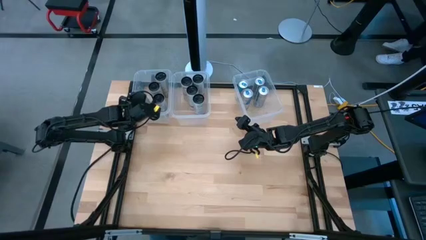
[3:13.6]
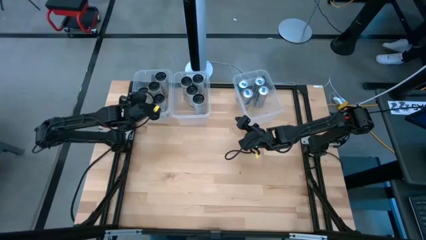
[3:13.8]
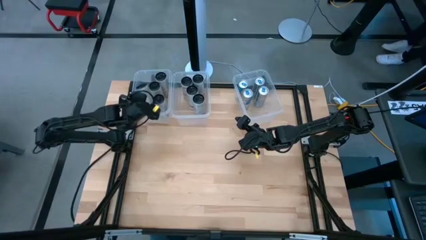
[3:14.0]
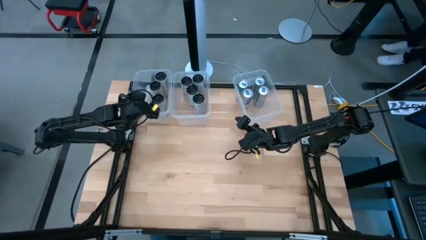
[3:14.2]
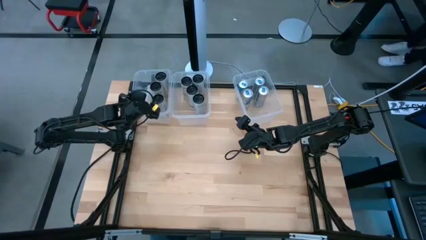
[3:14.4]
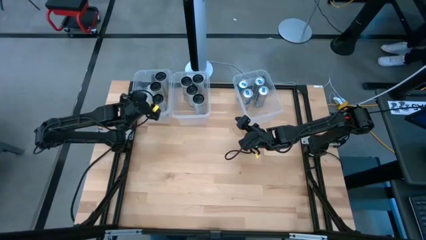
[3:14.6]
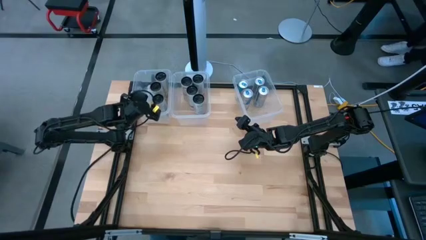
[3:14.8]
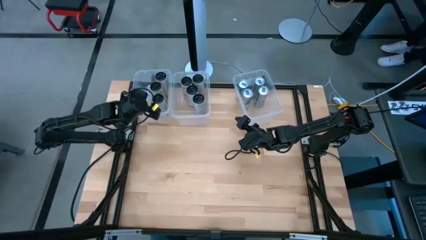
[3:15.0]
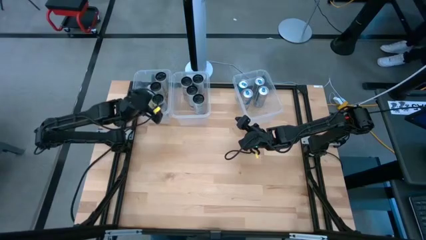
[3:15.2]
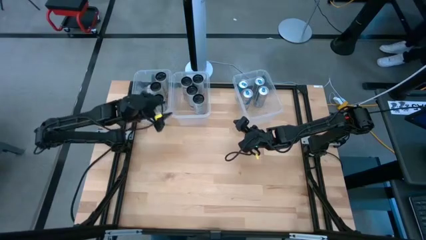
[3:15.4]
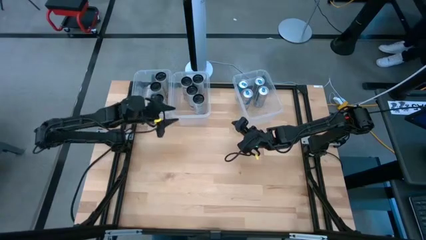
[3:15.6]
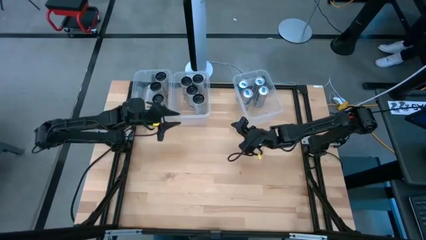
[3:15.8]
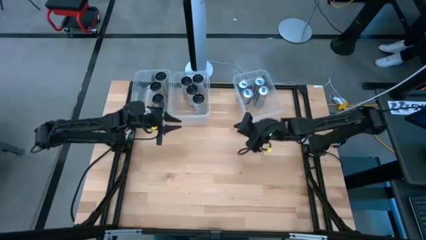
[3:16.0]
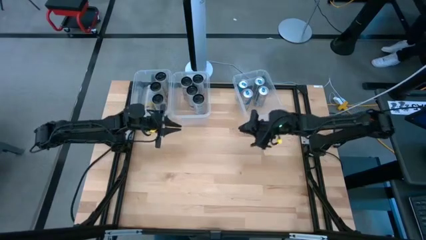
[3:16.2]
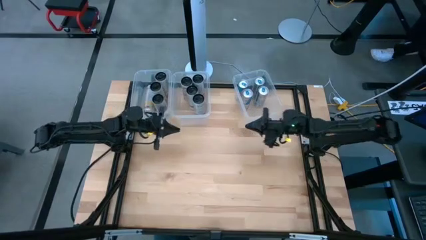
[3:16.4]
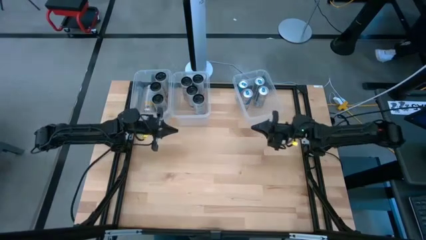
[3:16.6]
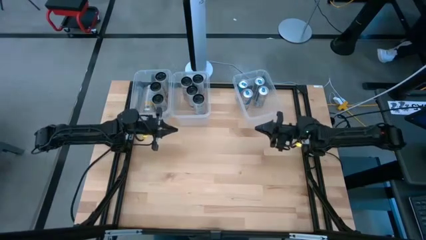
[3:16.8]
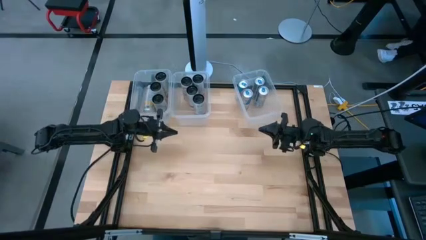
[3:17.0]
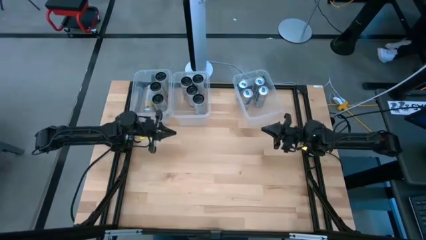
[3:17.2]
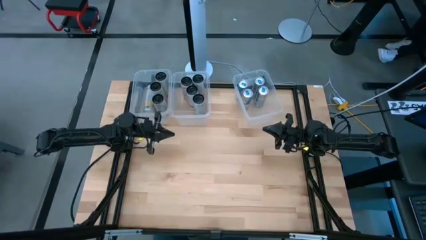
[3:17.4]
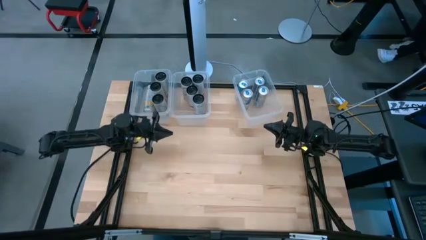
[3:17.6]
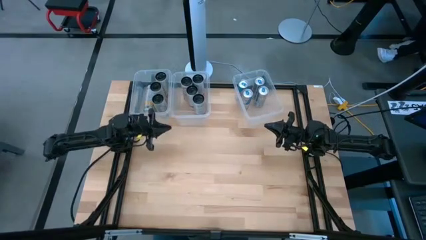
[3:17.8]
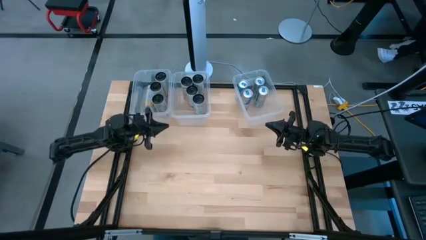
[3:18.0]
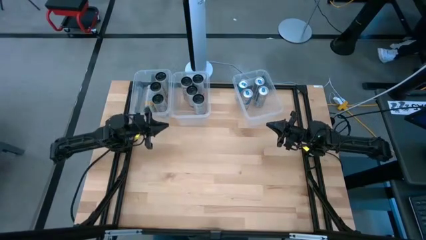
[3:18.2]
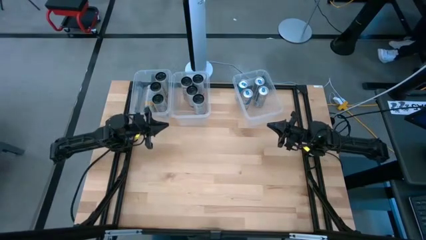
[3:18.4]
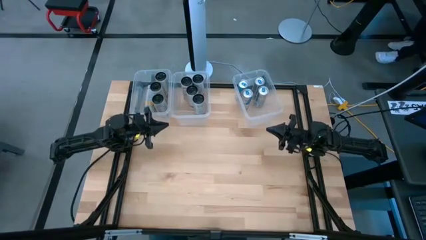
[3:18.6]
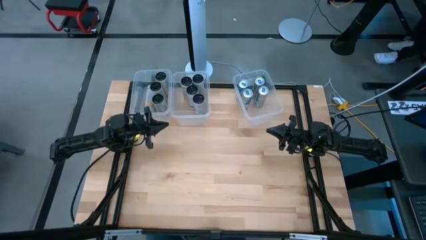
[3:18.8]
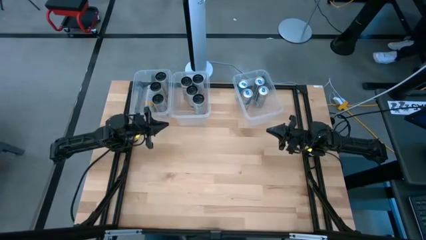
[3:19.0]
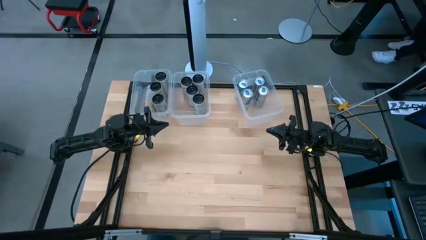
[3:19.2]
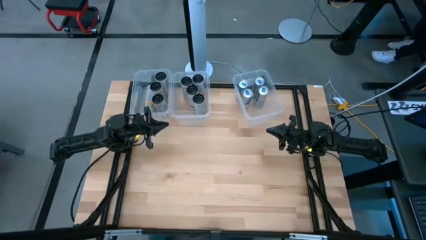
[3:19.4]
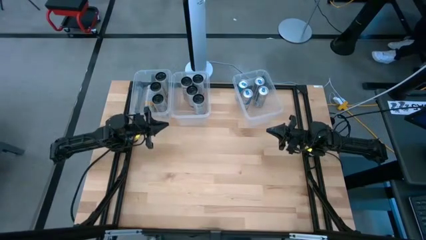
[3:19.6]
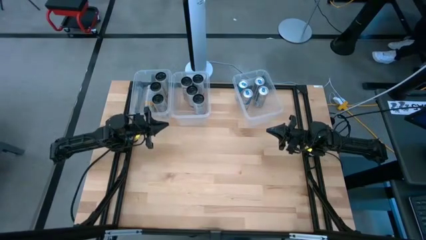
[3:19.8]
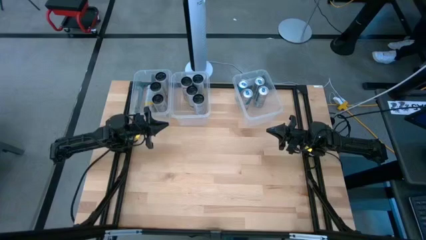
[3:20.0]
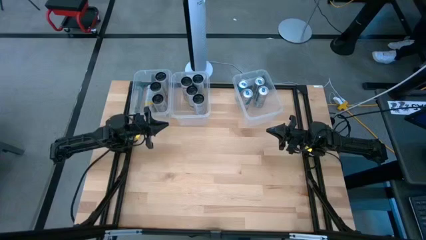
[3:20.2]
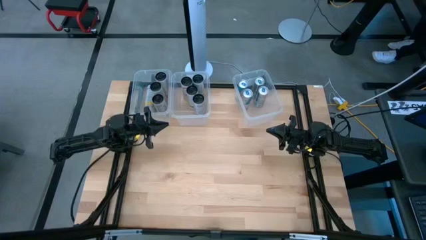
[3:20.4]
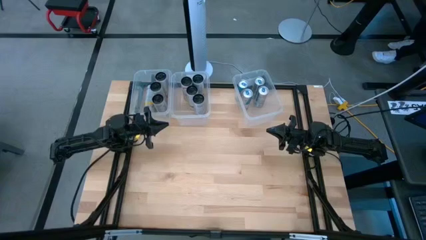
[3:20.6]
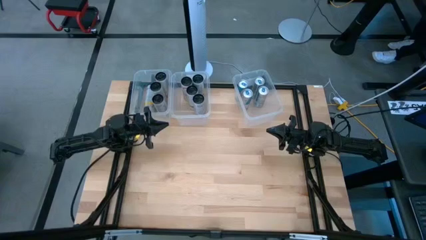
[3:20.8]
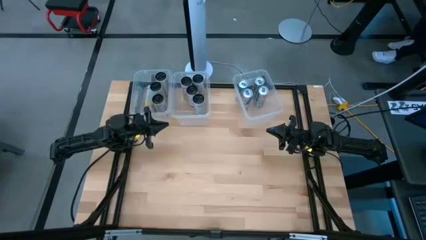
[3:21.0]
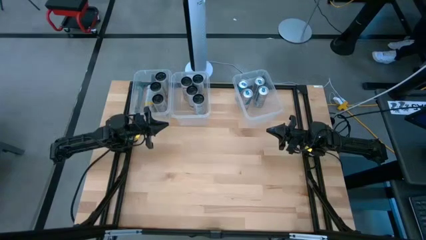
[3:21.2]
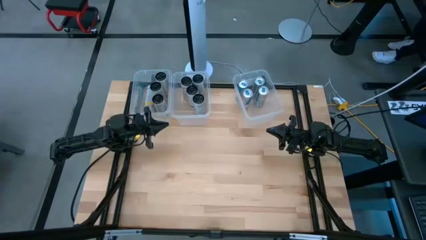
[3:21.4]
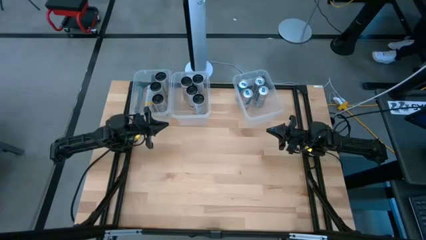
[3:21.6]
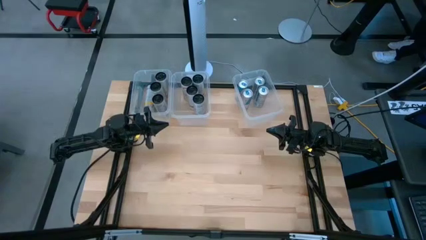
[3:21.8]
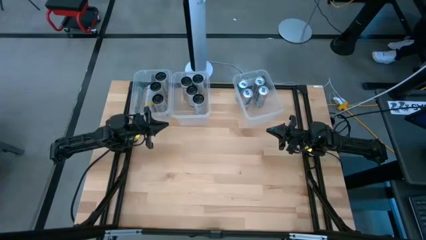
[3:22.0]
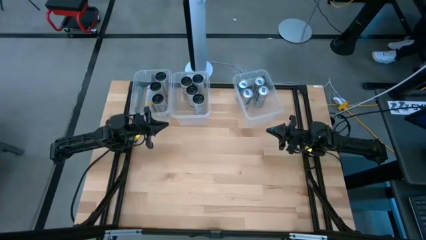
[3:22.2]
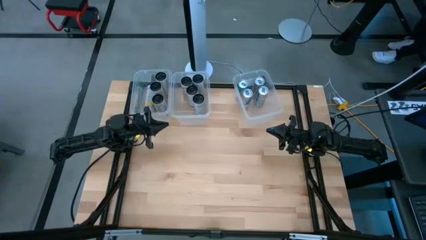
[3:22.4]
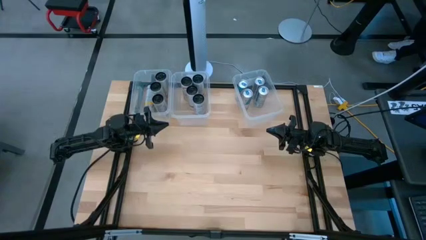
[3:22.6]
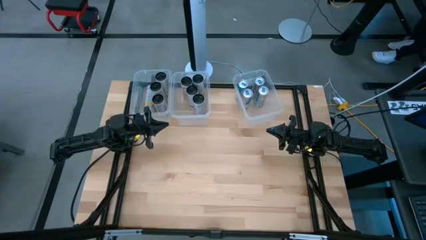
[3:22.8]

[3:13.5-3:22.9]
Task: Sort soda cans
Return to Home Position
